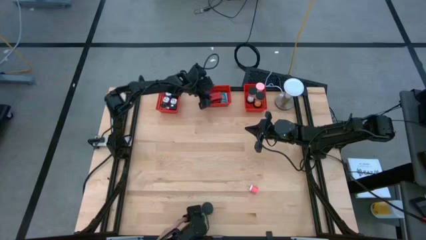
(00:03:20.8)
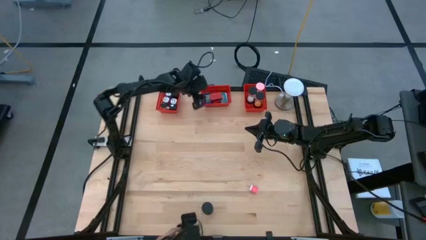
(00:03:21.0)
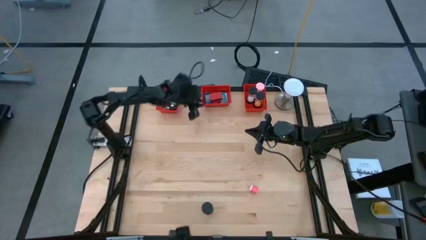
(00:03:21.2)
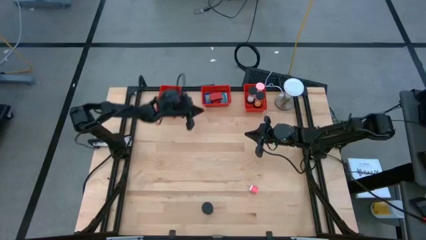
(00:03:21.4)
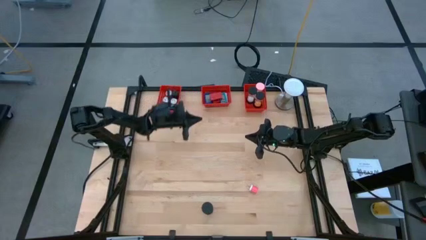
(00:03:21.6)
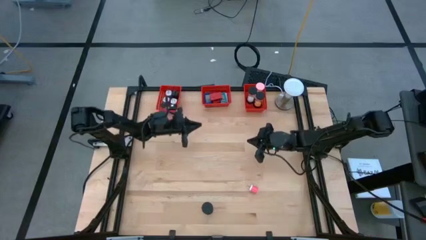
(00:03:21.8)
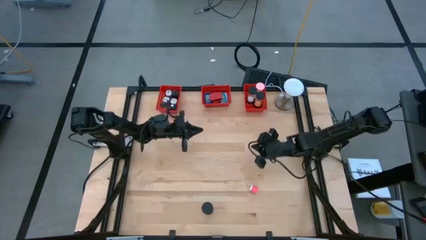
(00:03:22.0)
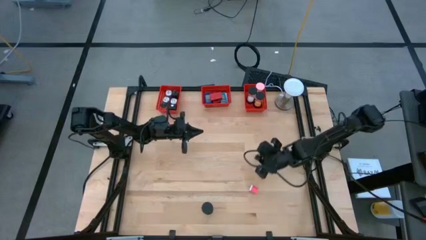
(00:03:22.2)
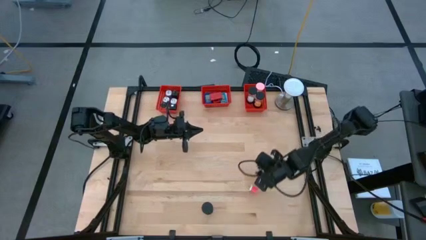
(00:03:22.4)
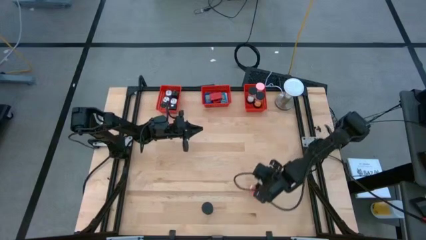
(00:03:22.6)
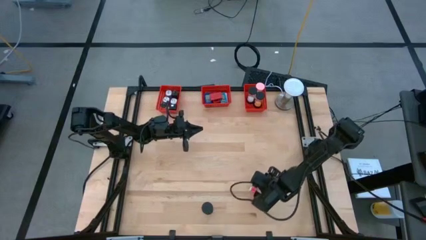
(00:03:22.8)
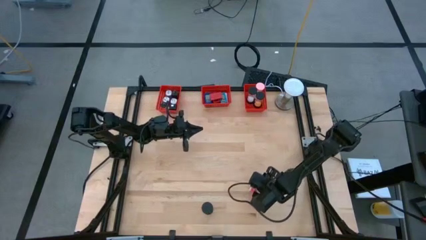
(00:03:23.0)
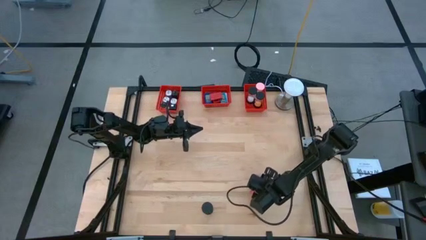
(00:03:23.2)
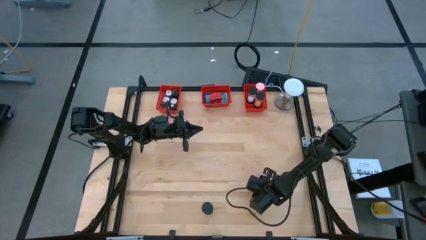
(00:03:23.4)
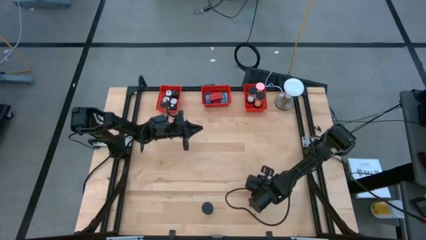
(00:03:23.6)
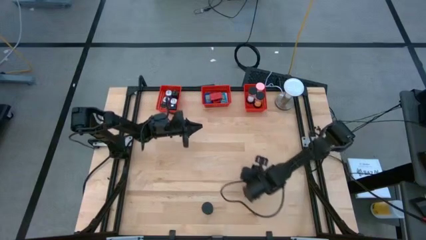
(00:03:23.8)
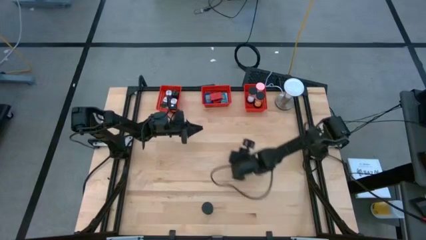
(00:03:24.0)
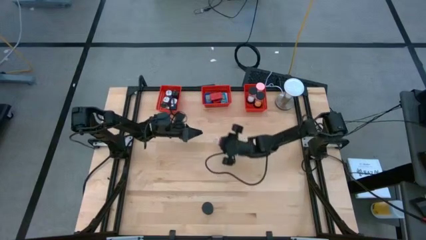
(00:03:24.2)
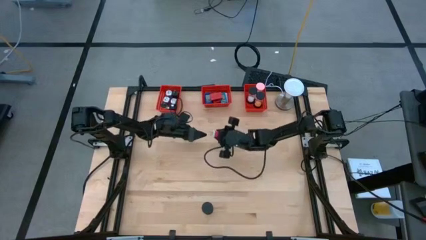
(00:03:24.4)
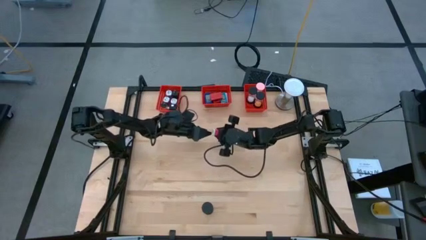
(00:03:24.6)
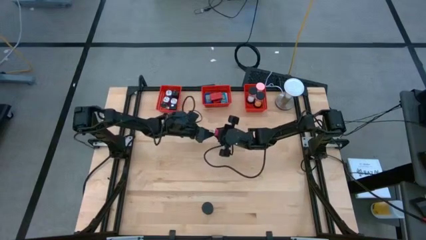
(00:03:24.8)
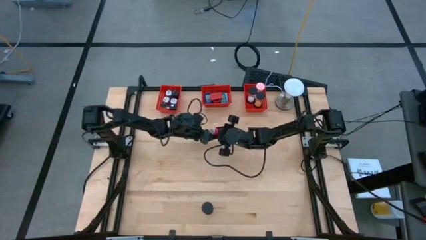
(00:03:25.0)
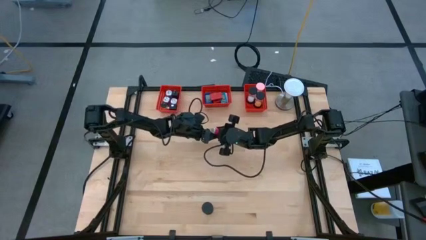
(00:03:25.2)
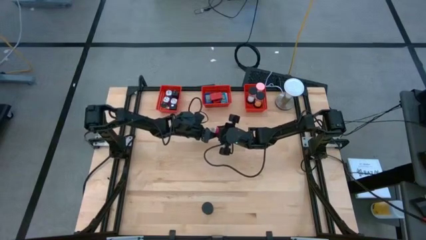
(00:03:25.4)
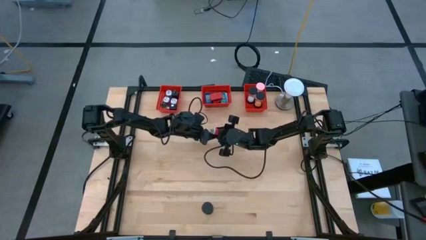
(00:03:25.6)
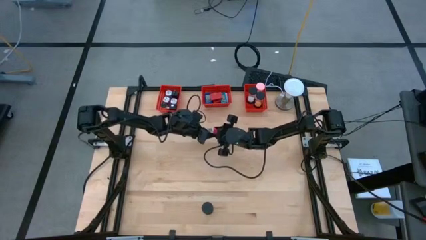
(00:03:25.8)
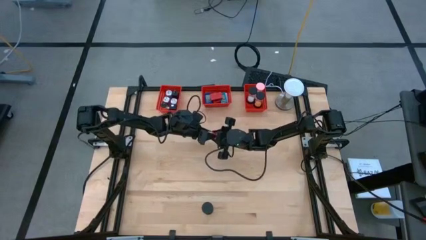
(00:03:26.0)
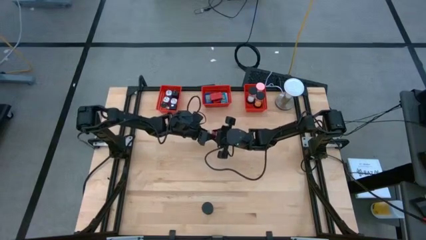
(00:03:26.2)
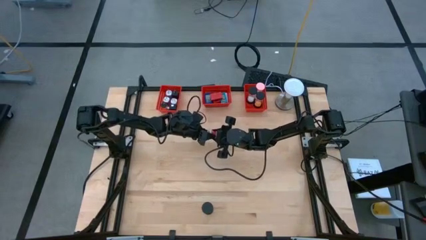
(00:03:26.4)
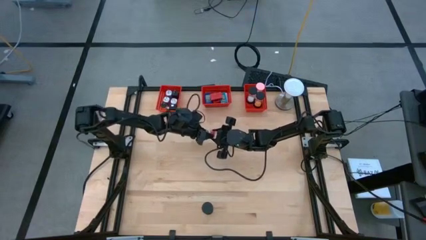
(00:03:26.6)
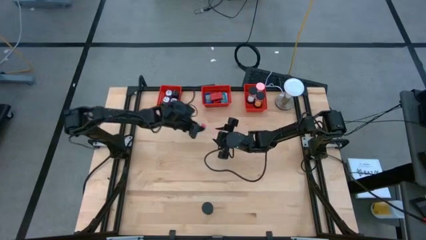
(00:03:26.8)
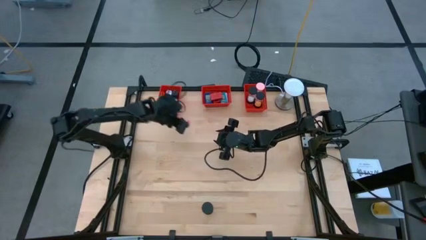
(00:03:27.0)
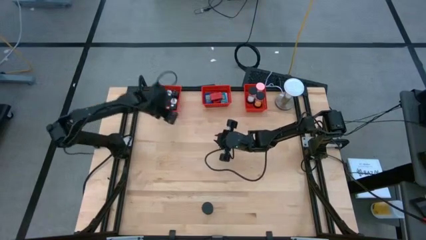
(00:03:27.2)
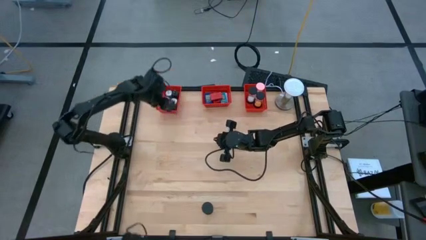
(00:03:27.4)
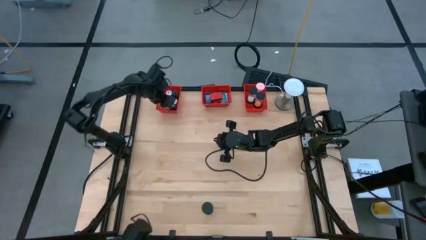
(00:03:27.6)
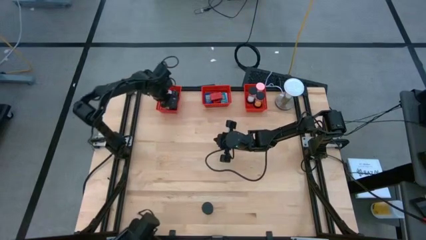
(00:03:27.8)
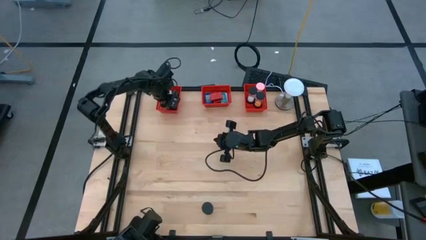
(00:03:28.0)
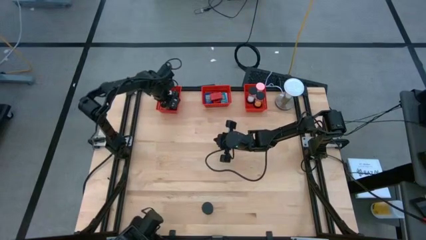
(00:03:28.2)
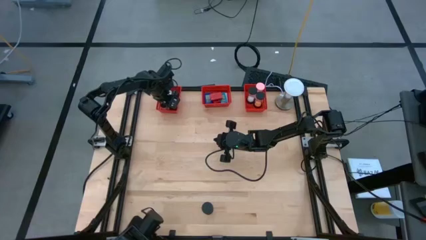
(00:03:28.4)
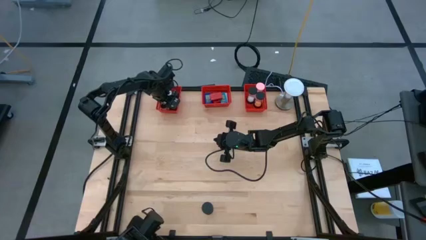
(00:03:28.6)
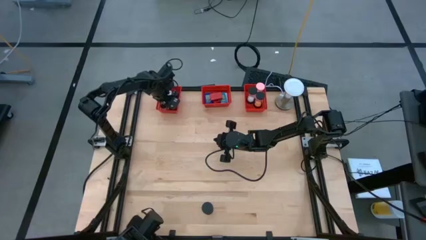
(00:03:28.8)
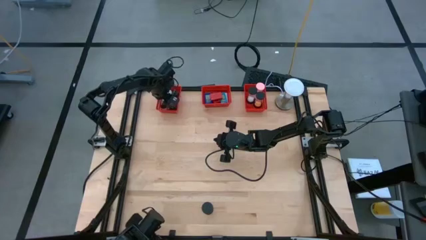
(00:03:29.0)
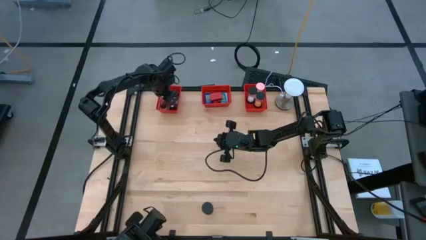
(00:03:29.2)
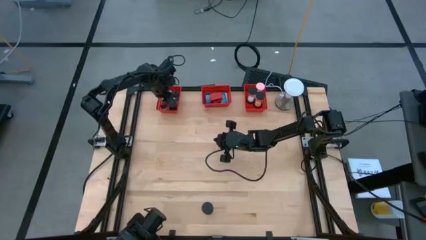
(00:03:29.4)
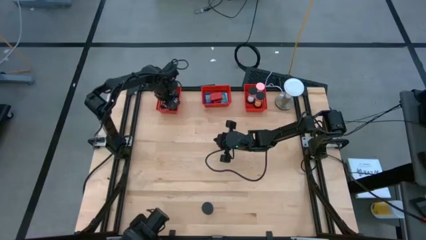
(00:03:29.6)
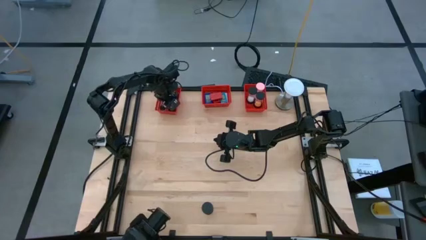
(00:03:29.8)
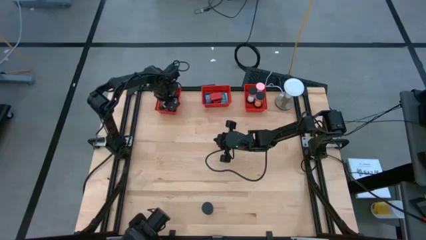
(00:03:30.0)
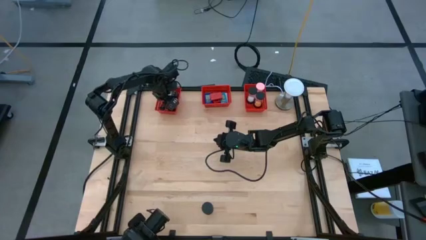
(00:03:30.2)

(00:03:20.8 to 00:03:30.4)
Task: Pick & Place Office items
Put the red charger adapter into the left red bin
